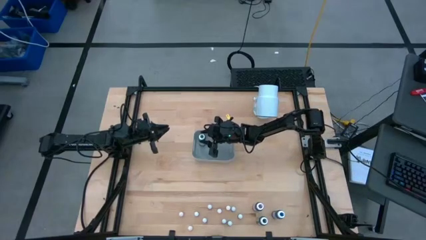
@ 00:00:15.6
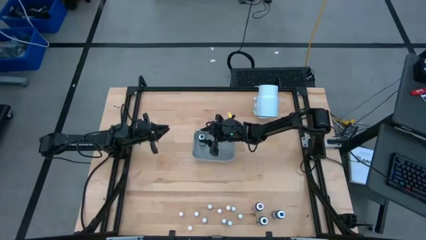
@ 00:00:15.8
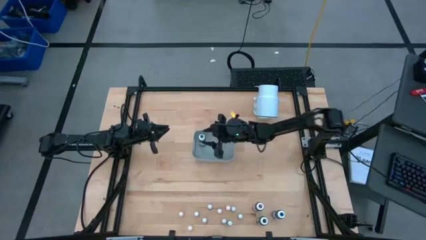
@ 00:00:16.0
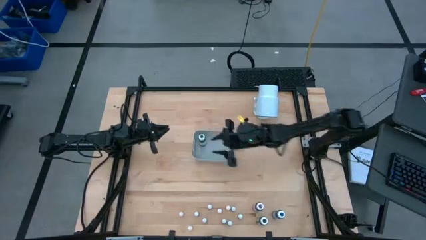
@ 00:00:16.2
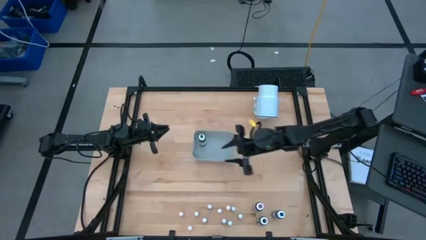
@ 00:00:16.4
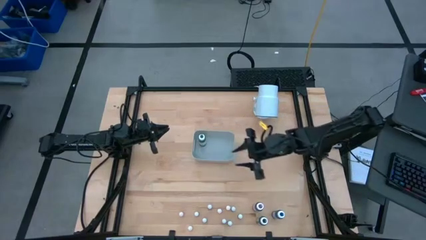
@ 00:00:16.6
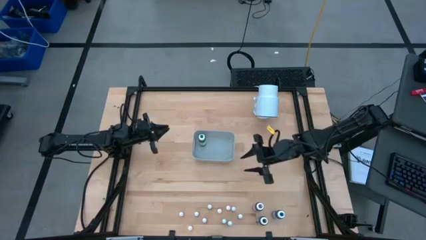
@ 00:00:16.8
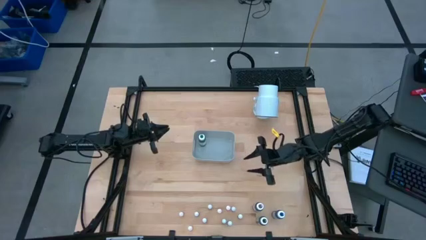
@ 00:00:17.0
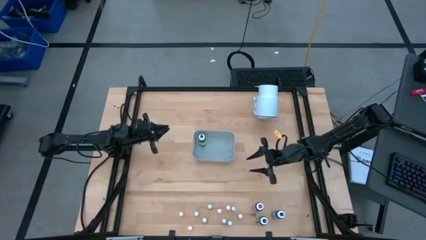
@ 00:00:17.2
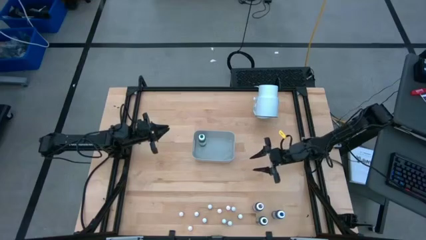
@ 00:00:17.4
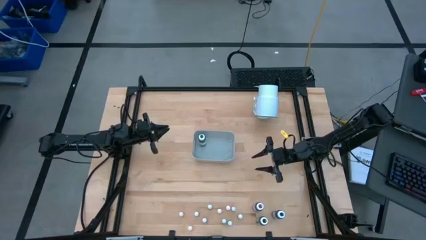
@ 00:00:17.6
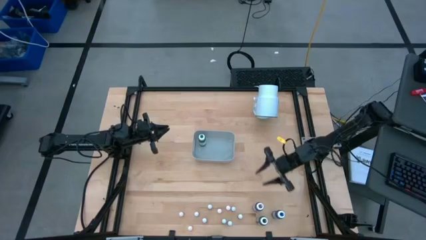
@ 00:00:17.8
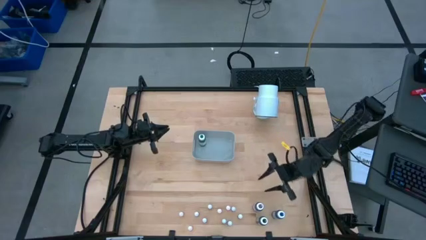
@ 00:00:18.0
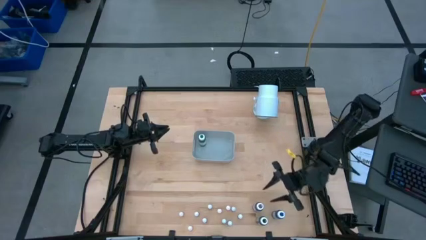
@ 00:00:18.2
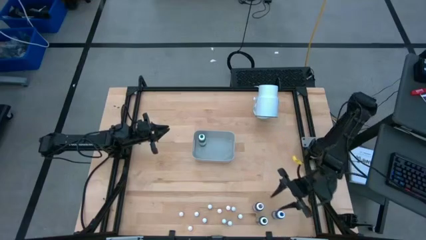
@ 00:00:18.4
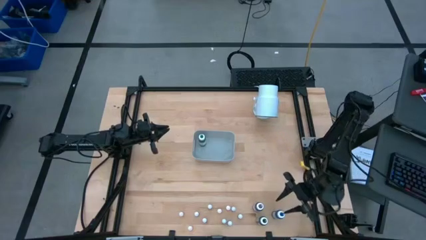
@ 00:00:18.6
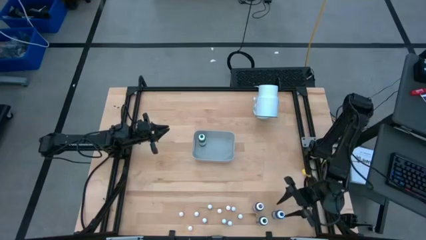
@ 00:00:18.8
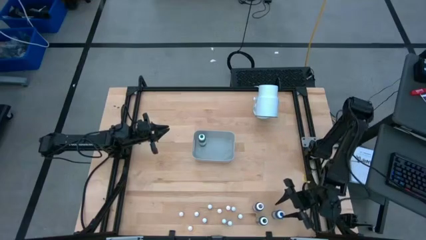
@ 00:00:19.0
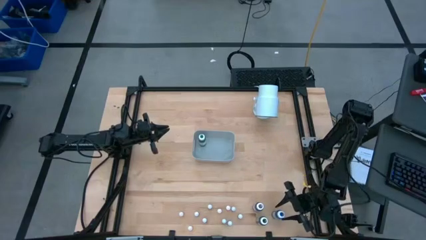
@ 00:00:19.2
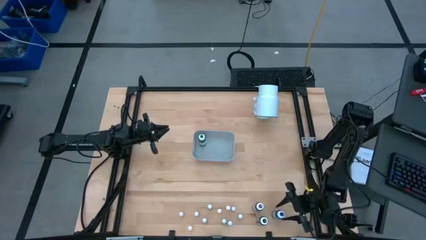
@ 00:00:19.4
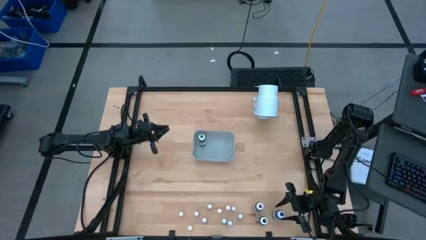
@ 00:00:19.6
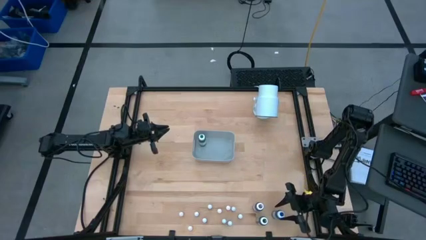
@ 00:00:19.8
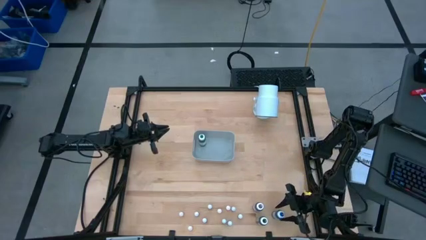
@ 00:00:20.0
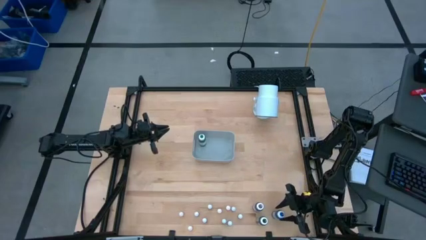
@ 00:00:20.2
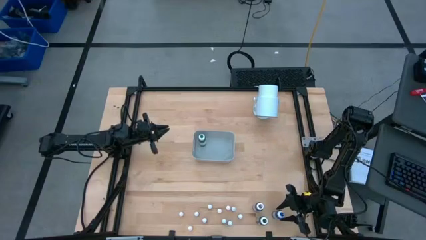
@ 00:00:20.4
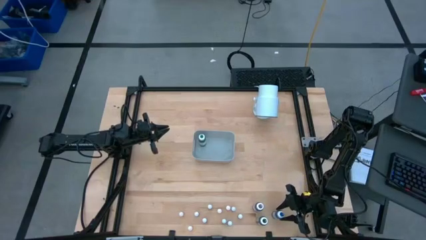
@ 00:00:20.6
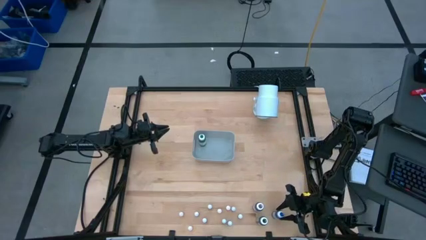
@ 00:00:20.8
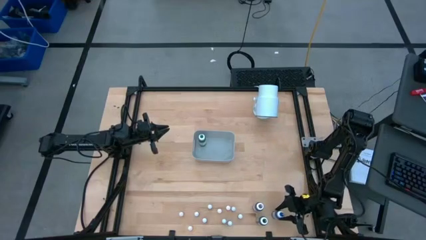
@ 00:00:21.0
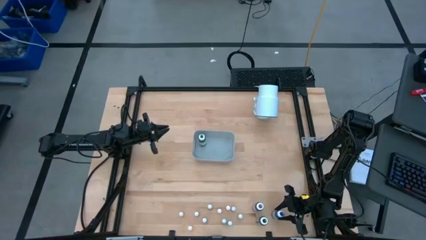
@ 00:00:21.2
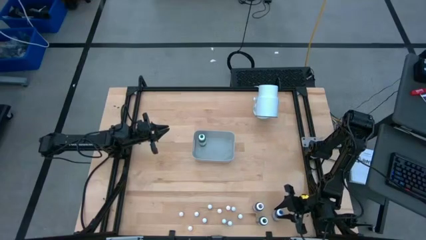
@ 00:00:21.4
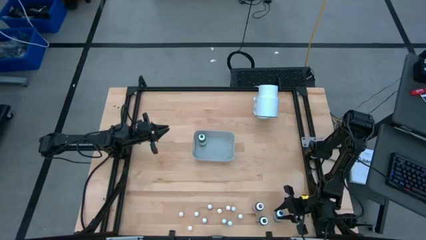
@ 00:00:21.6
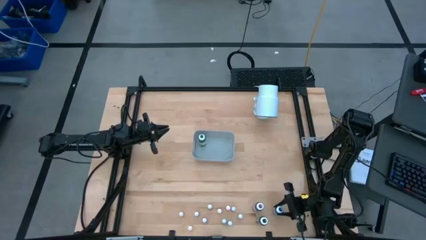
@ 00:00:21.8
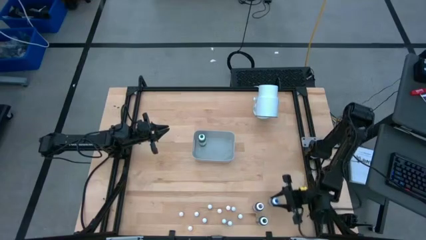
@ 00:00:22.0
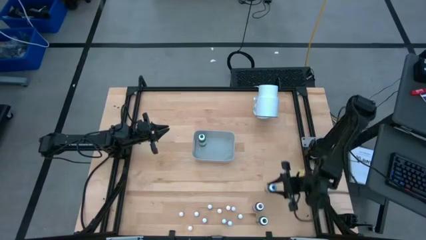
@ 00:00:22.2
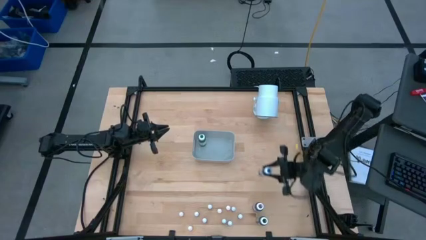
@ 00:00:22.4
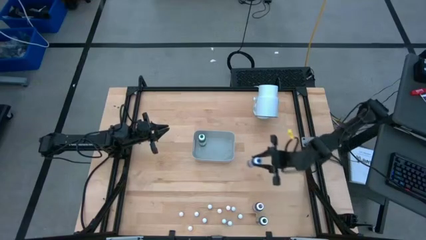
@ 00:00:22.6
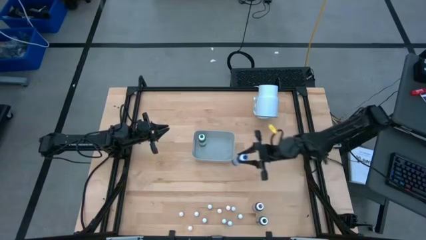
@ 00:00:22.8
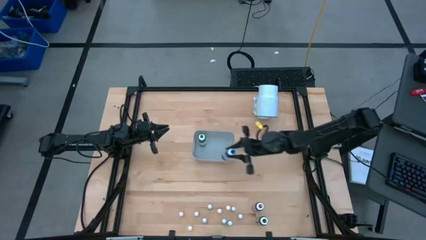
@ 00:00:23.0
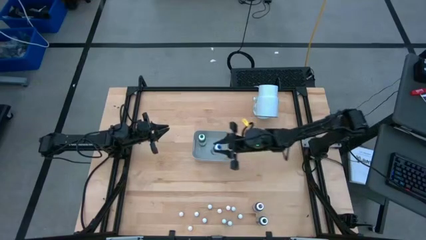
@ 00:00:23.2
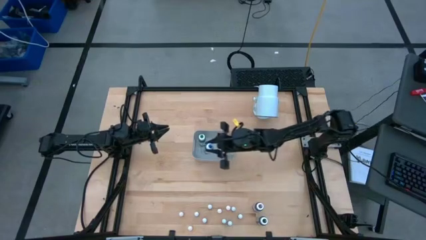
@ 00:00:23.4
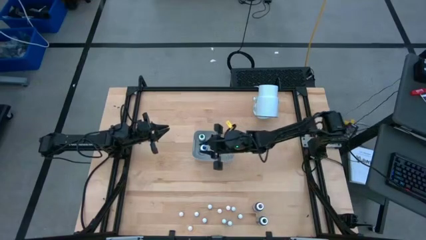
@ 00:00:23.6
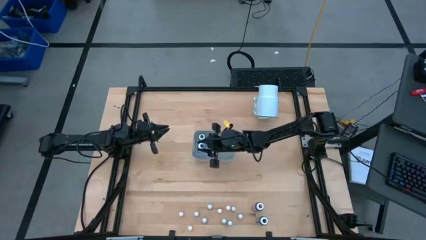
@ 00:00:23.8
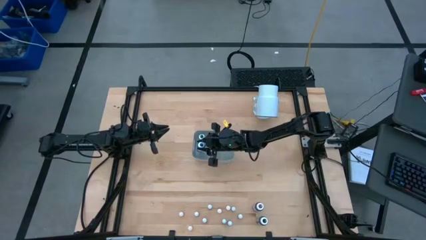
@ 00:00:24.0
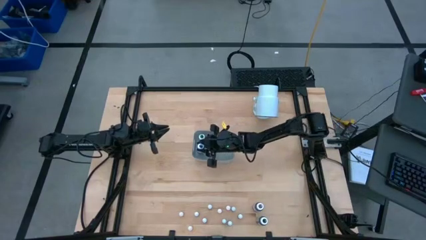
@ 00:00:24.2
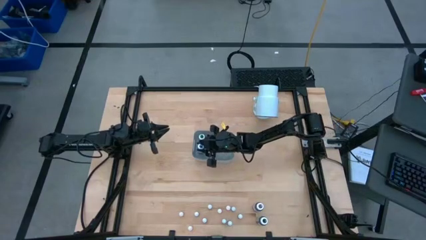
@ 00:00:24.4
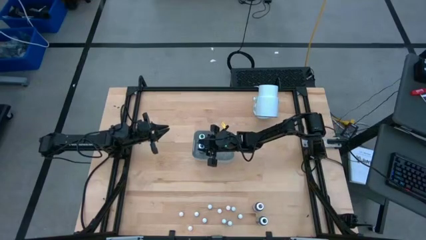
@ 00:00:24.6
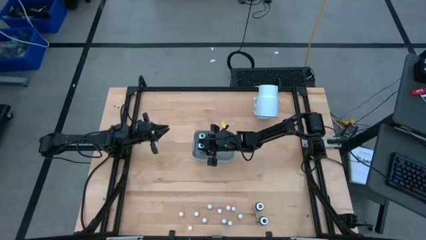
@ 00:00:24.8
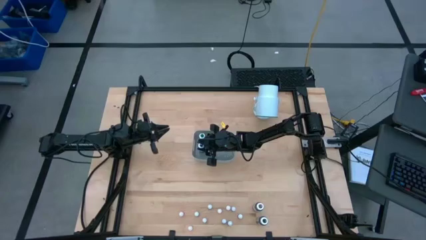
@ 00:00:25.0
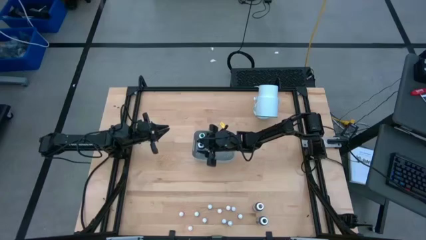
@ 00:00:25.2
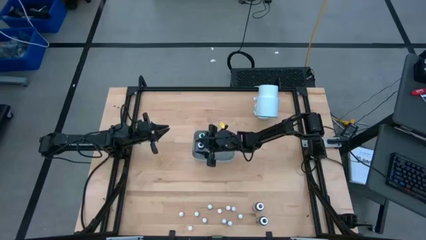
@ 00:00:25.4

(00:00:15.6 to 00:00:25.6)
Task: Pick & Place food coloring
Put the big blue food coloring bottle into the gray bin

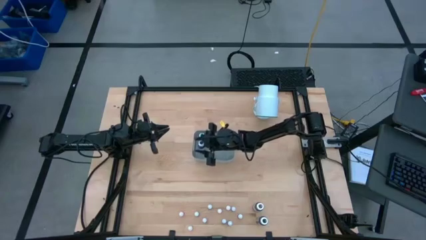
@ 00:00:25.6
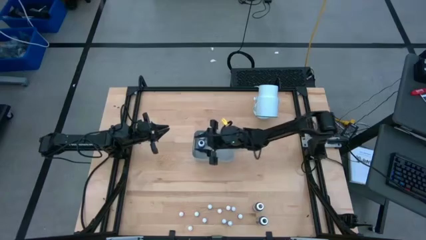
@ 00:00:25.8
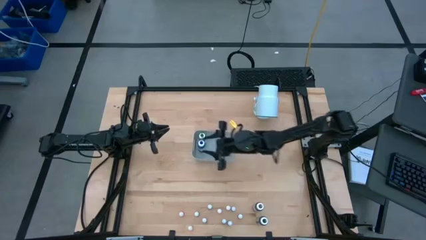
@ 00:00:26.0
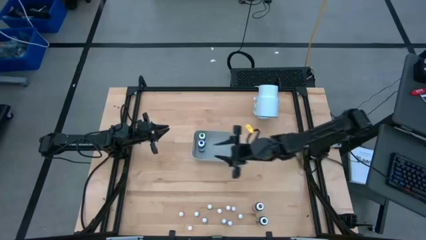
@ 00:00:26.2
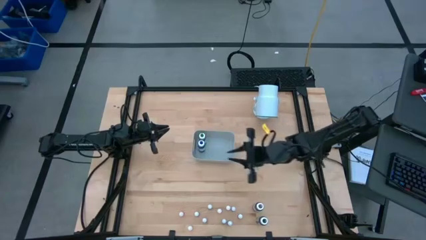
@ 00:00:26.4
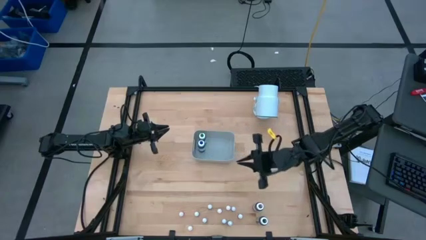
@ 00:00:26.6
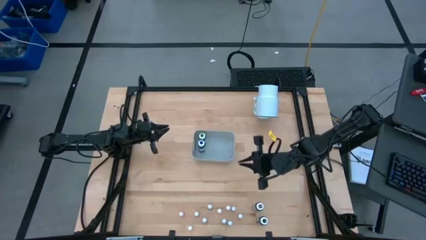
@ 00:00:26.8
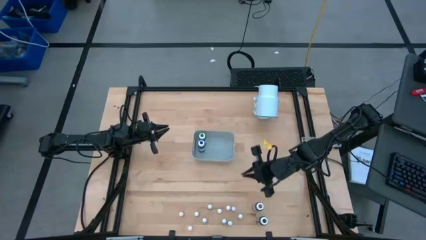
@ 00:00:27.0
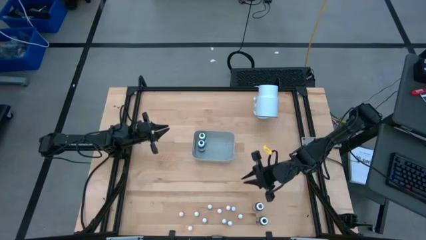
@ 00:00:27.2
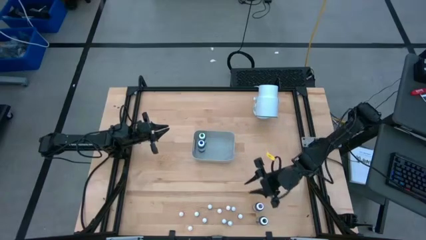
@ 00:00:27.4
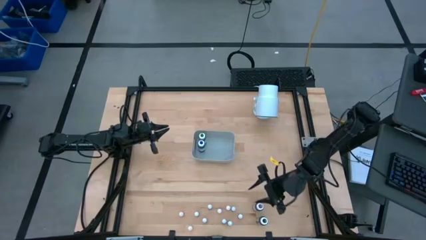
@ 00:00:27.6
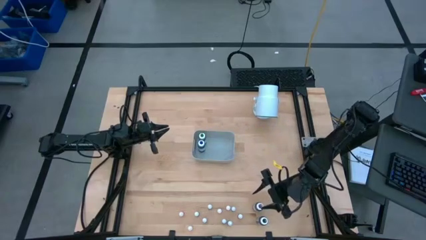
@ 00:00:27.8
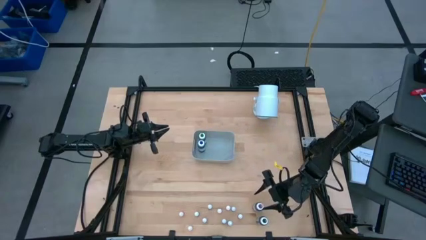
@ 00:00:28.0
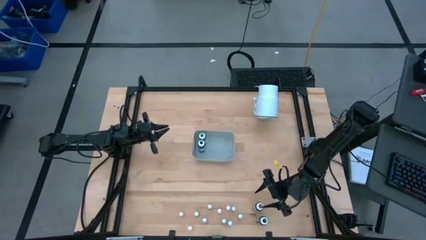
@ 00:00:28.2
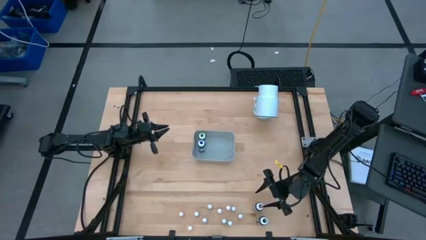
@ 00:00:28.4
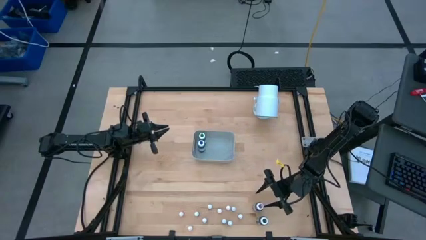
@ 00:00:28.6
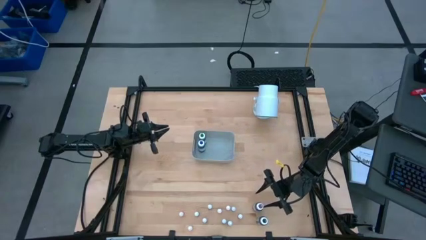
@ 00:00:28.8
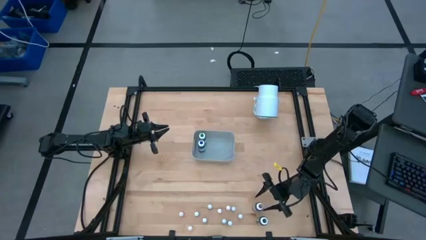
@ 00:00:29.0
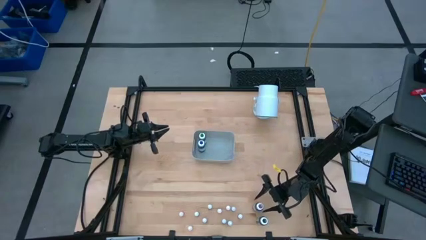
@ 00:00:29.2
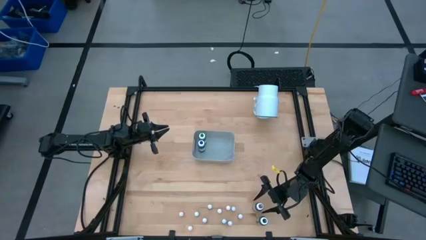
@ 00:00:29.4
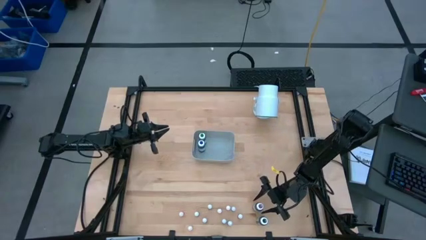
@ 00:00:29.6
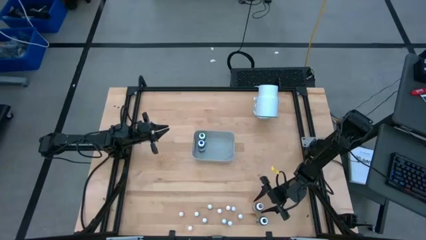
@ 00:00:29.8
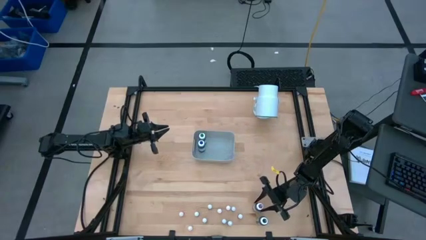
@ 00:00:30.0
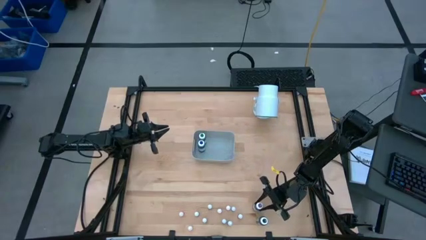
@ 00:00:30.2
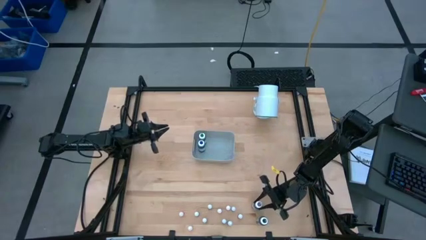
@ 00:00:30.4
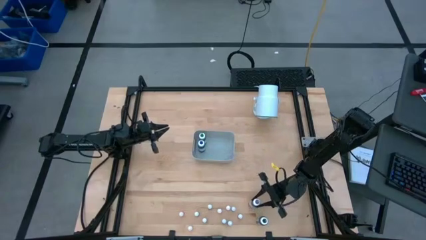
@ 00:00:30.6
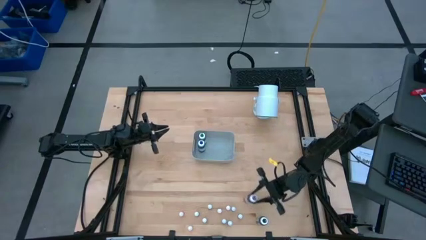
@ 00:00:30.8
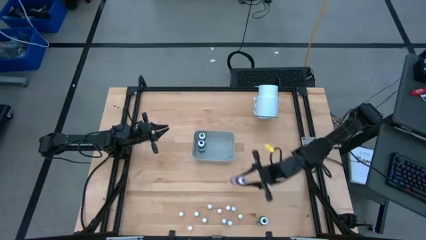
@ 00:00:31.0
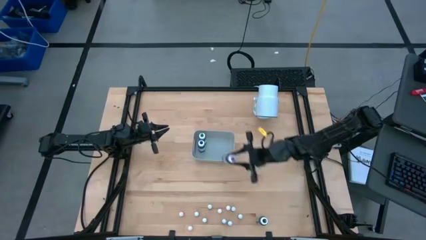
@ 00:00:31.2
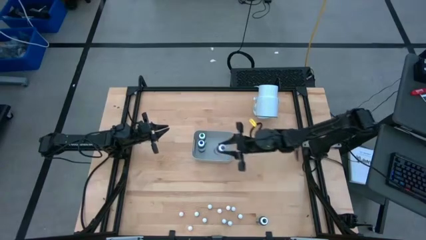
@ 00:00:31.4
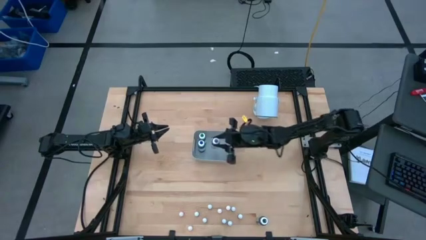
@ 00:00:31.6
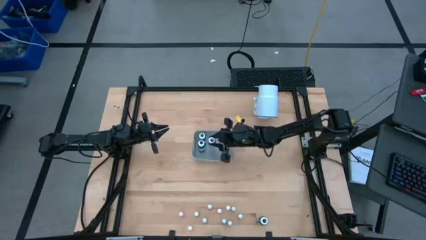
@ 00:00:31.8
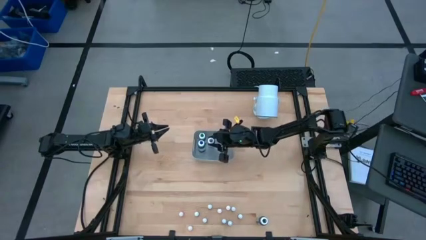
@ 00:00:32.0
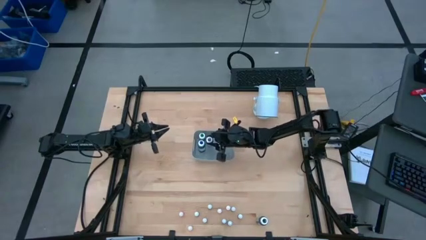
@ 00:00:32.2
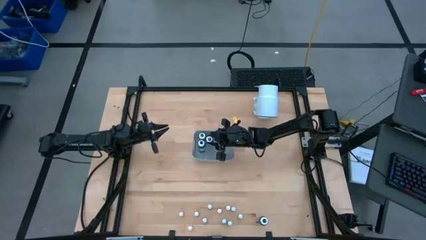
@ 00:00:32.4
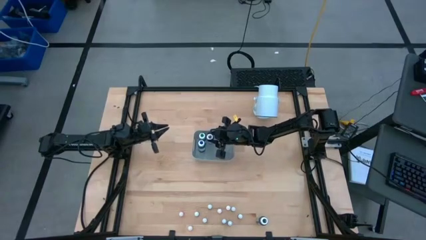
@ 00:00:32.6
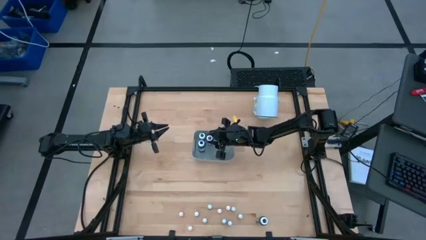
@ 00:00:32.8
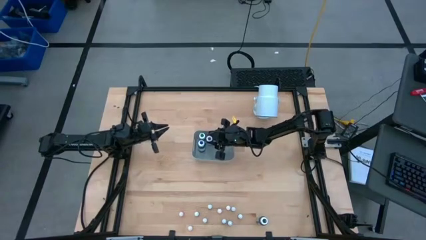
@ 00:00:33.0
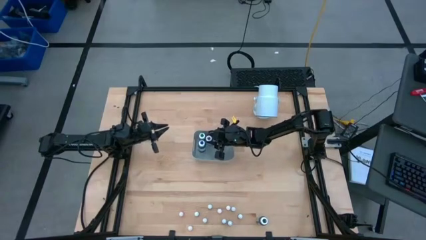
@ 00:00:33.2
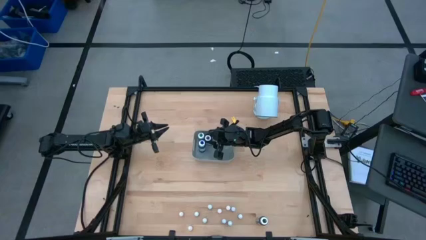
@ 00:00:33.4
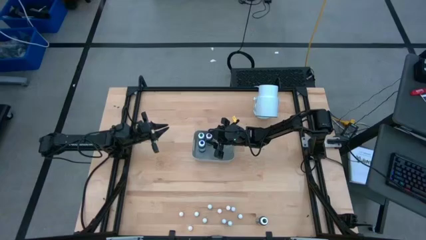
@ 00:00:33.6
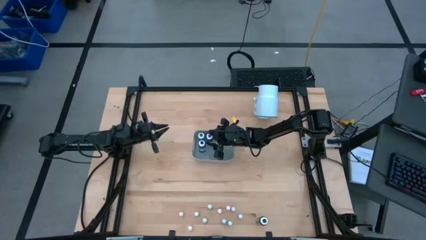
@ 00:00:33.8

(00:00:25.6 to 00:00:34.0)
Put the big violet food coloring bottle into the gray bin
